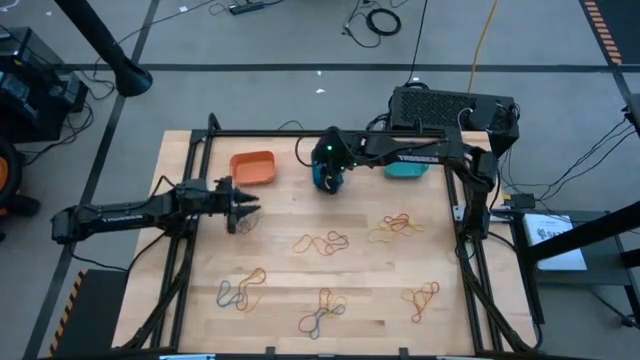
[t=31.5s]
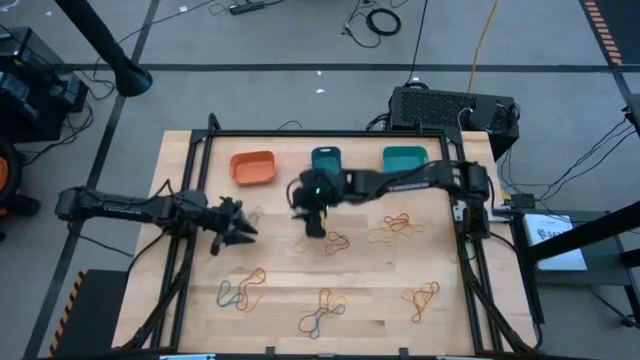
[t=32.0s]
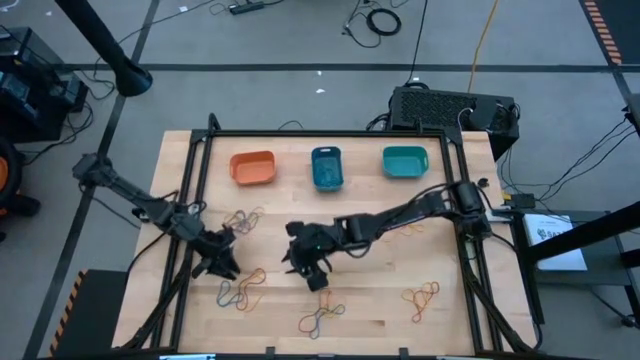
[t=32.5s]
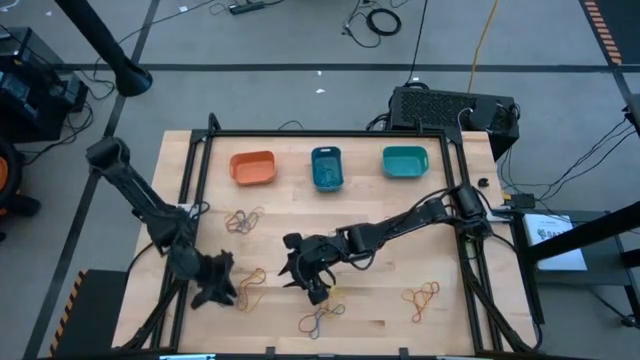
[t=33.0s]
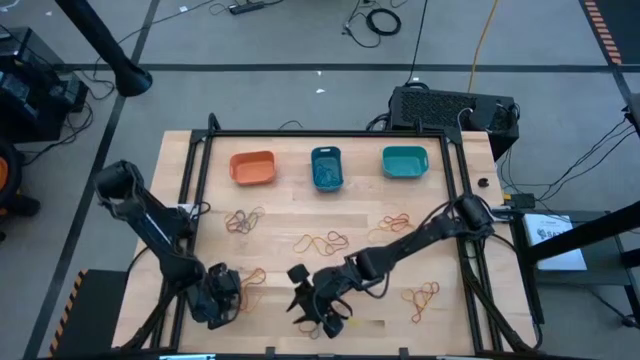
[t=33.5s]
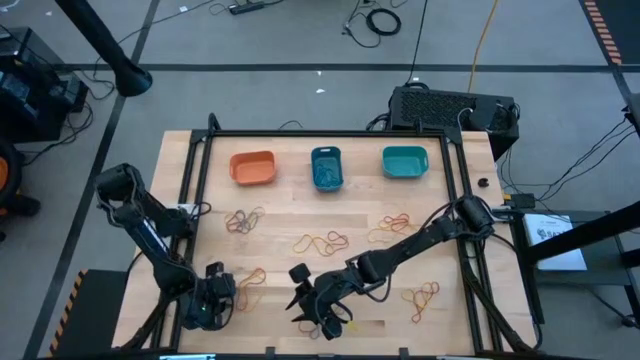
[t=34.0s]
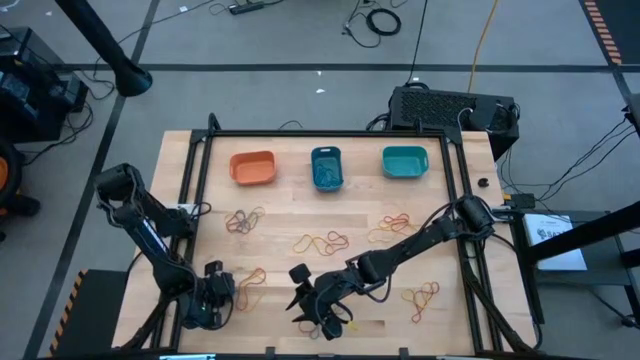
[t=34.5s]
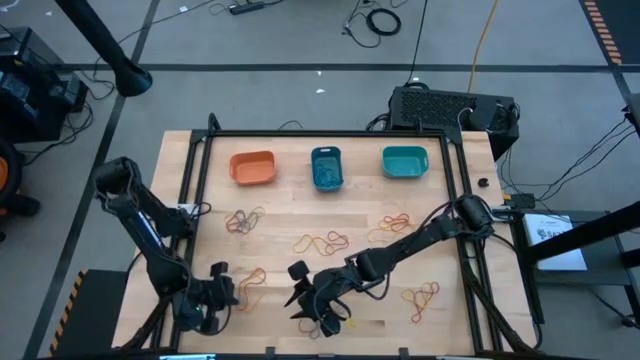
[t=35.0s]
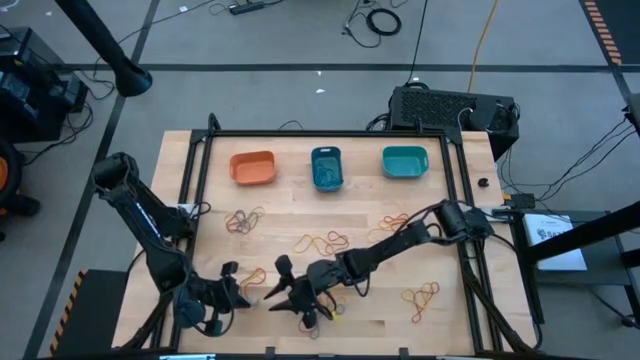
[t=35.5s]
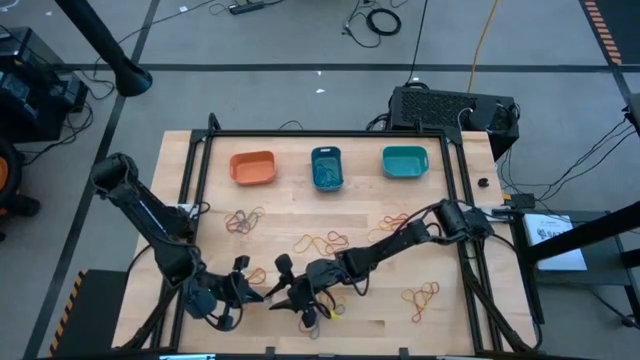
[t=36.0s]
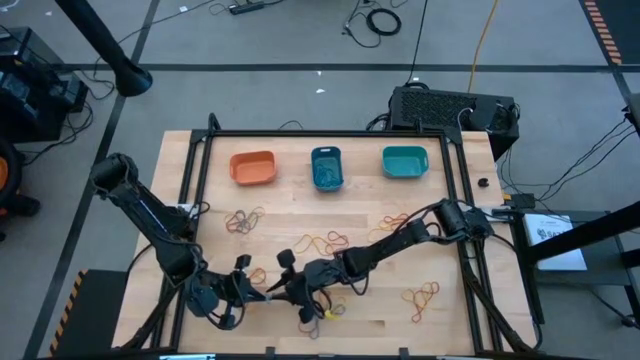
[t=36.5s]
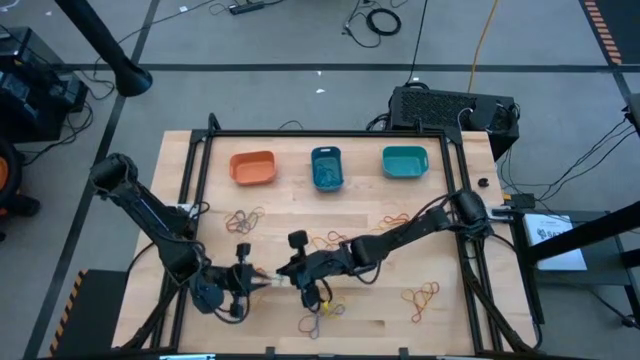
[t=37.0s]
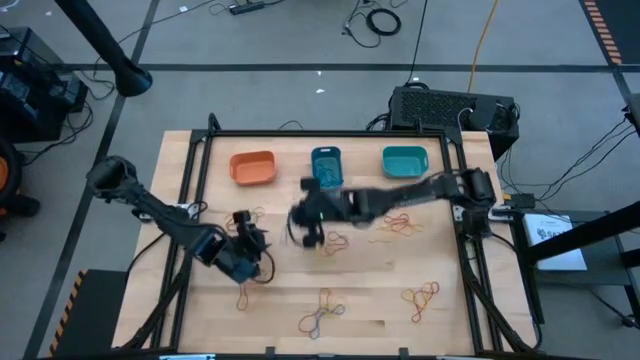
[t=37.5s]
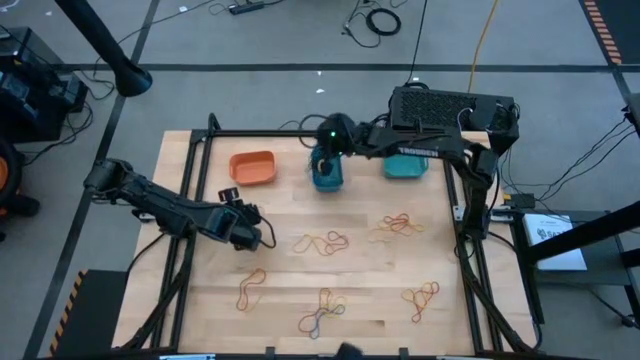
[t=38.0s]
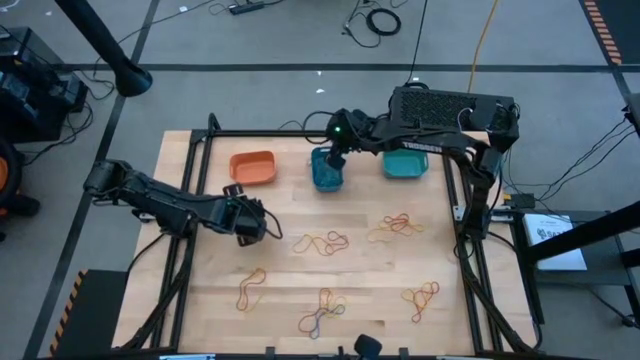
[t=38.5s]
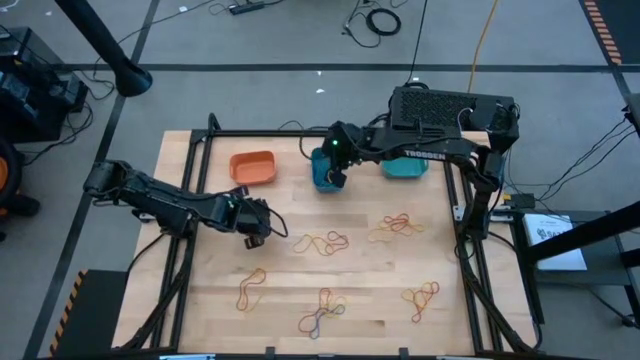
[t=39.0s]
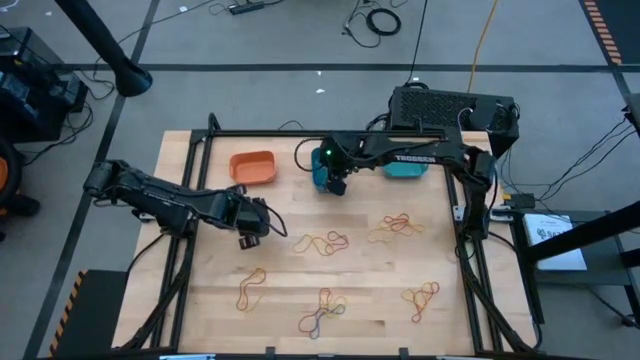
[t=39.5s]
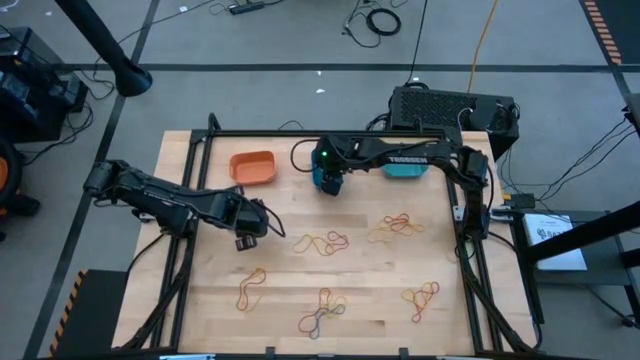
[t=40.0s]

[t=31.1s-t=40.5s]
Task: Sort rubber bands into baskets
Put the blue rubber band into the blue bin

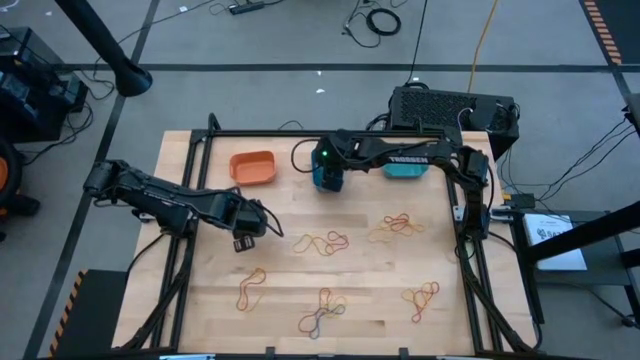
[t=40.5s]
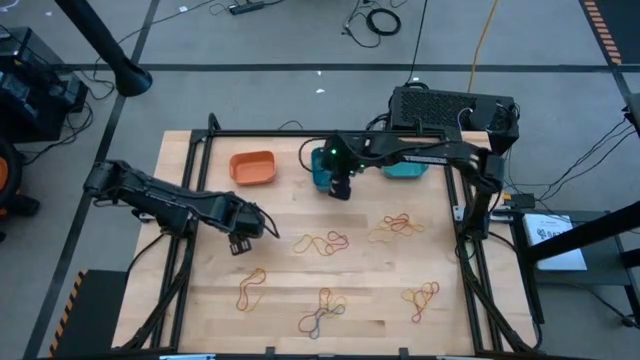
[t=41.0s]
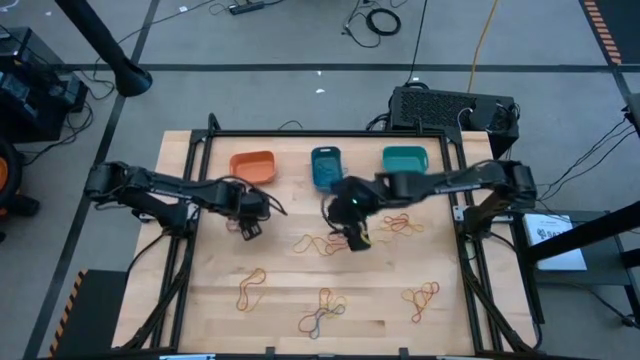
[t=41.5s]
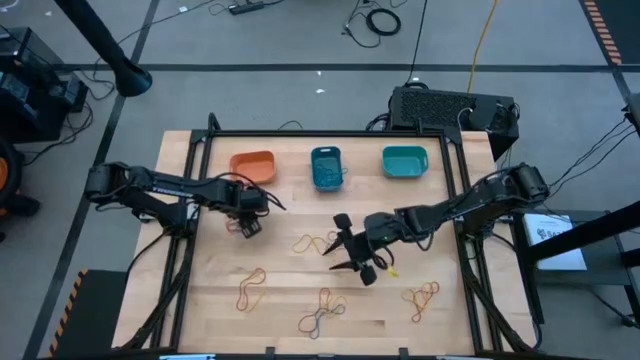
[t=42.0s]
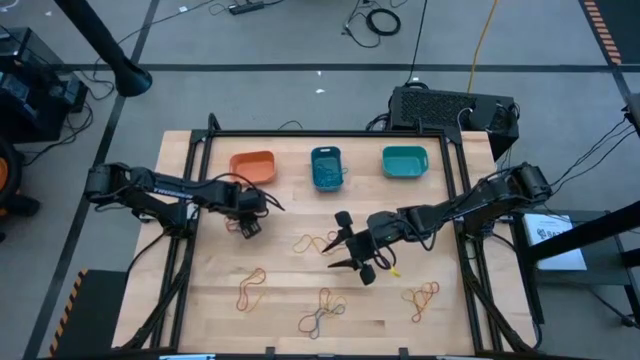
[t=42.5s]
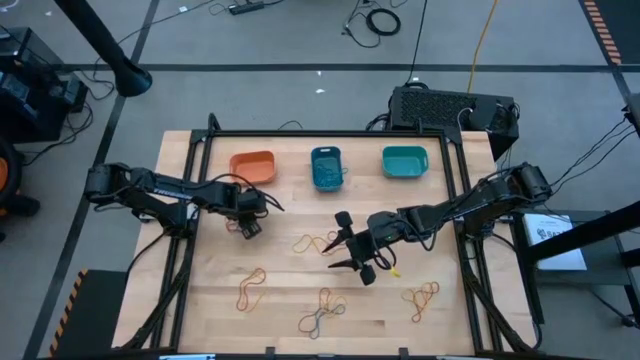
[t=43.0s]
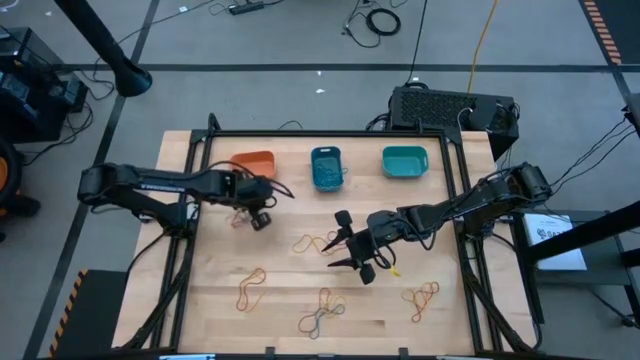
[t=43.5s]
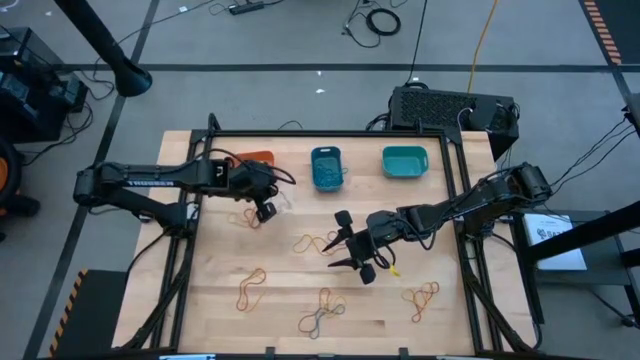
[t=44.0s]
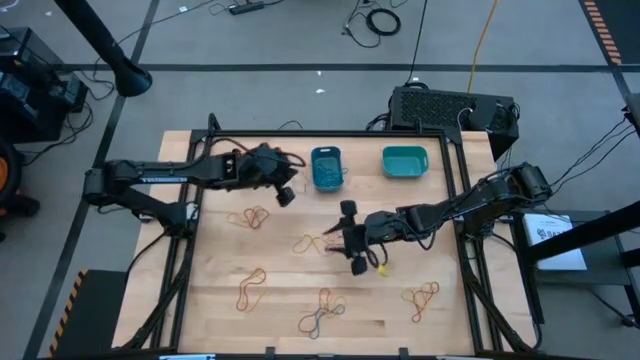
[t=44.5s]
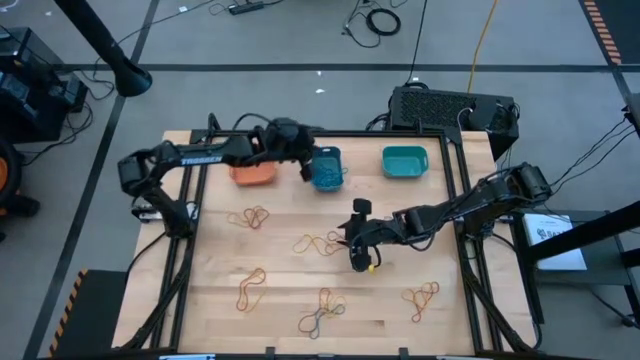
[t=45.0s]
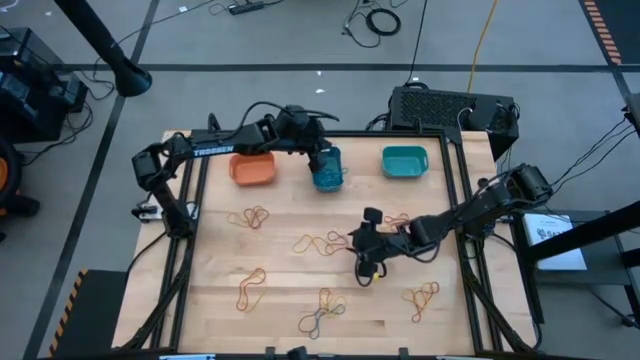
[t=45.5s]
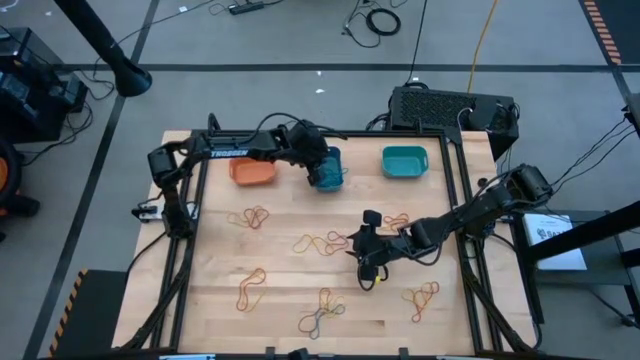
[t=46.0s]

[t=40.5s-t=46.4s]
Put the blue rubber band into the blue bin

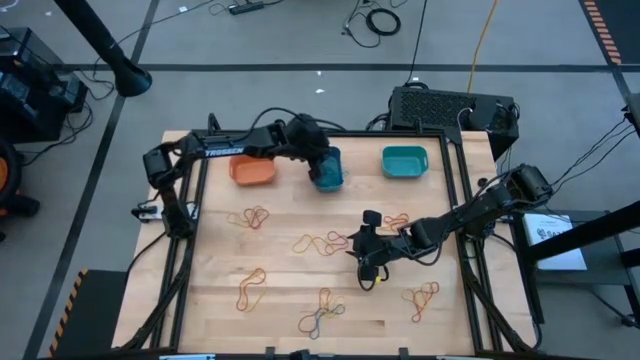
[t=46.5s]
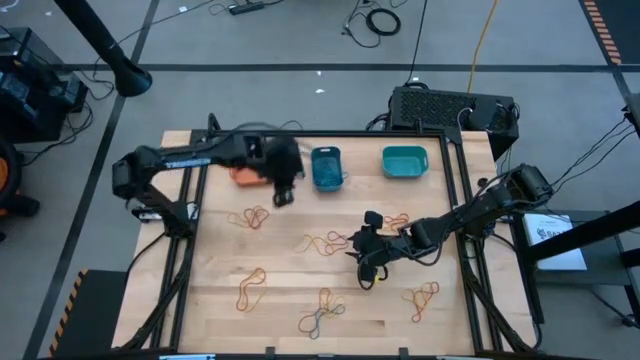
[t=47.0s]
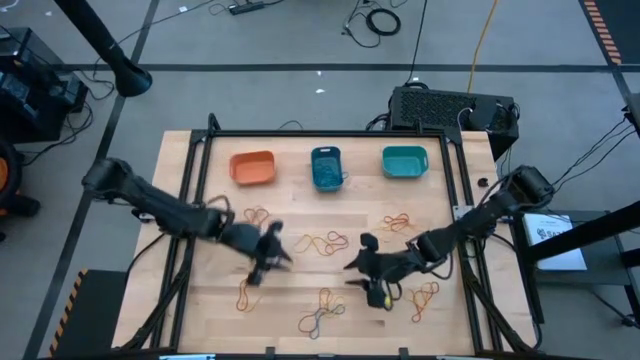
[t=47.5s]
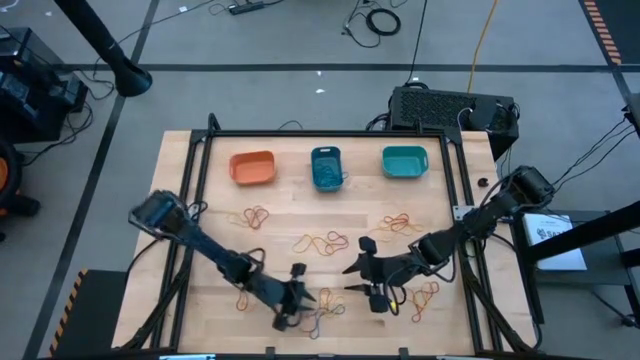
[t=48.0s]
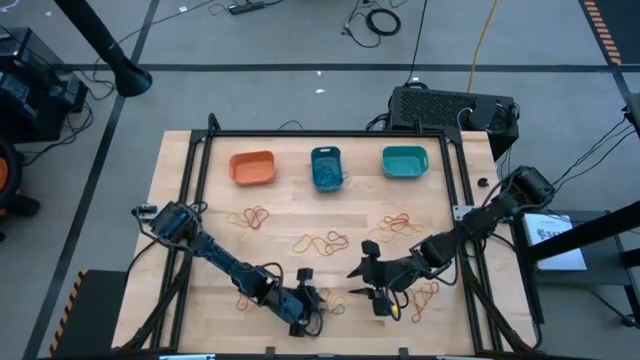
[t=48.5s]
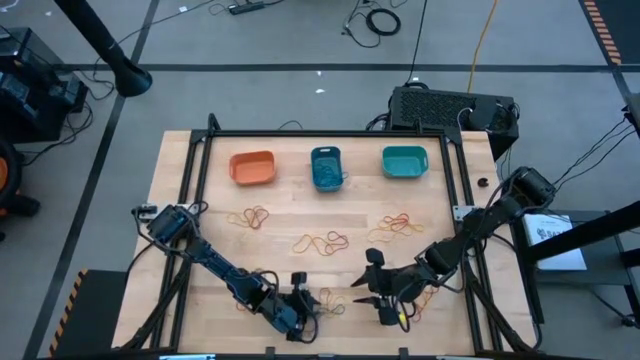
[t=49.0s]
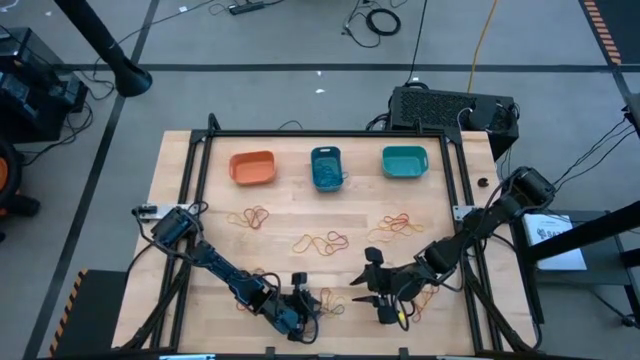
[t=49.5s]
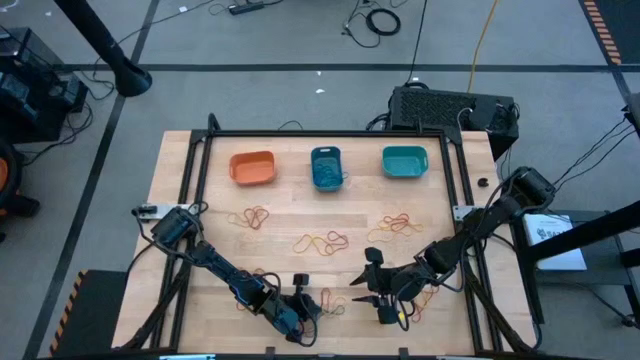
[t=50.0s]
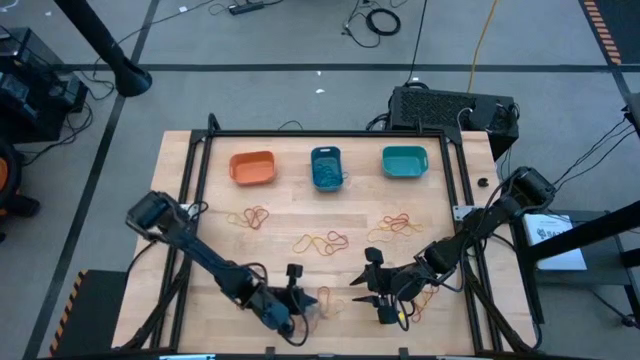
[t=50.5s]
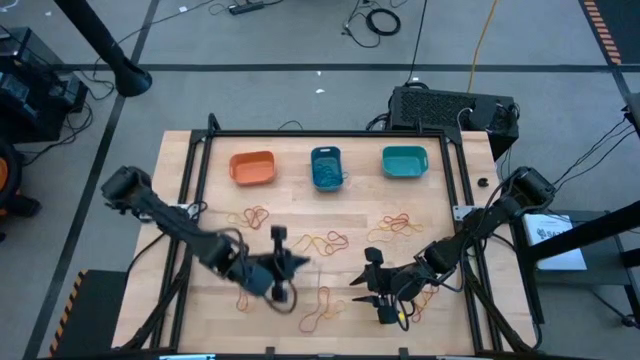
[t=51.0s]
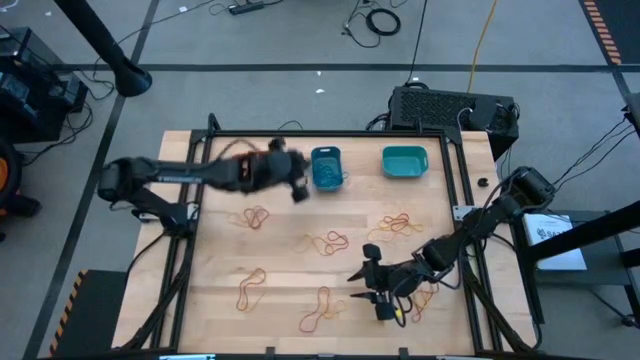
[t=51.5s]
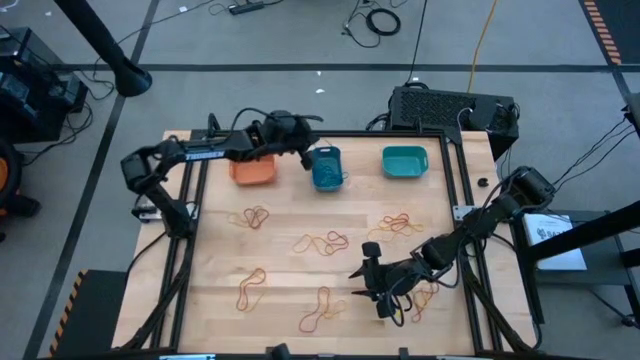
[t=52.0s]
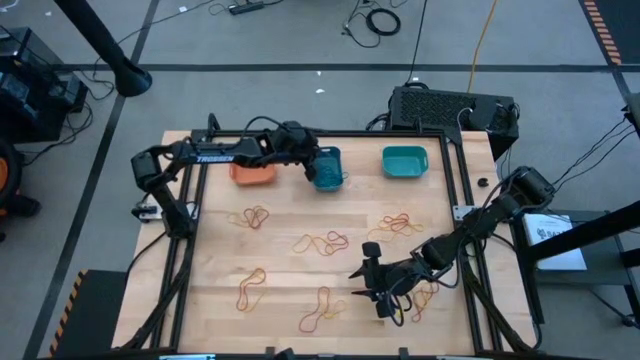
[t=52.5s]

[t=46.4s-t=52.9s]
Put the blue rubber band into the blue bin
